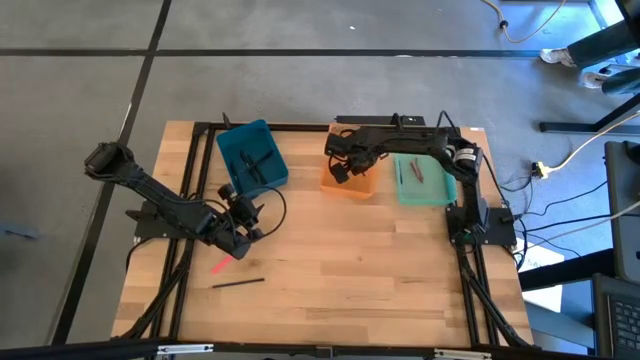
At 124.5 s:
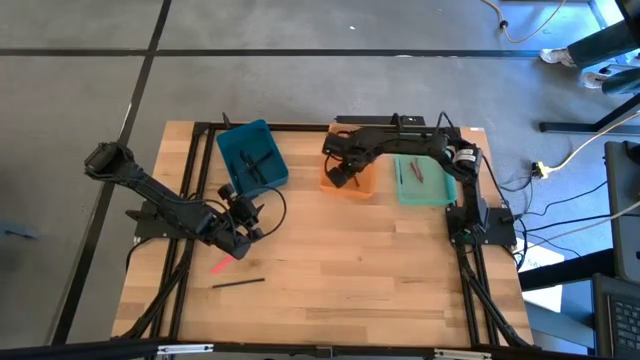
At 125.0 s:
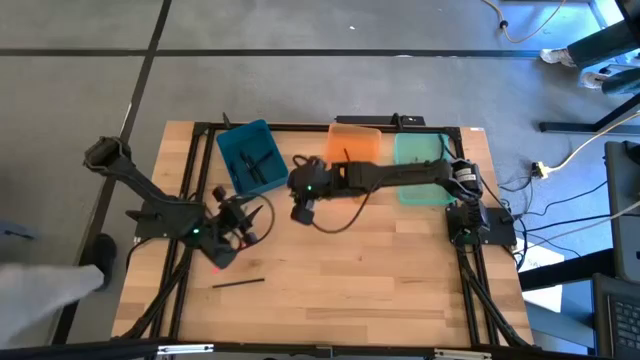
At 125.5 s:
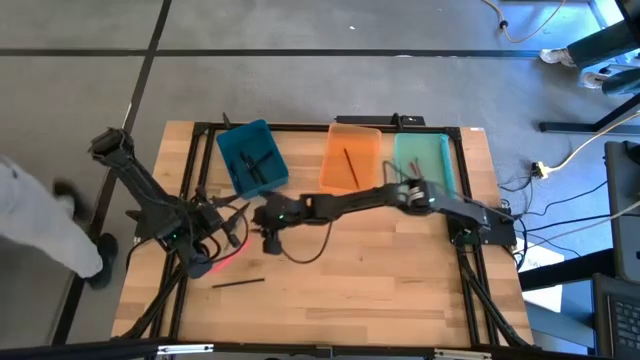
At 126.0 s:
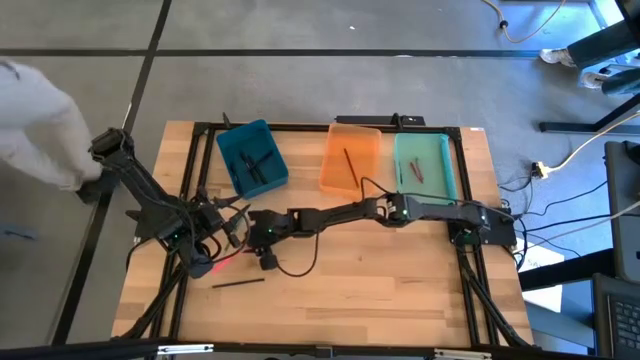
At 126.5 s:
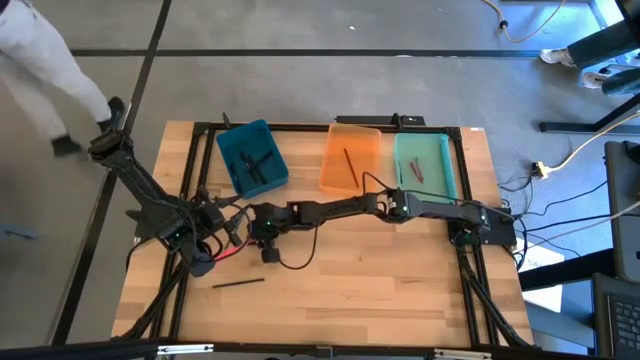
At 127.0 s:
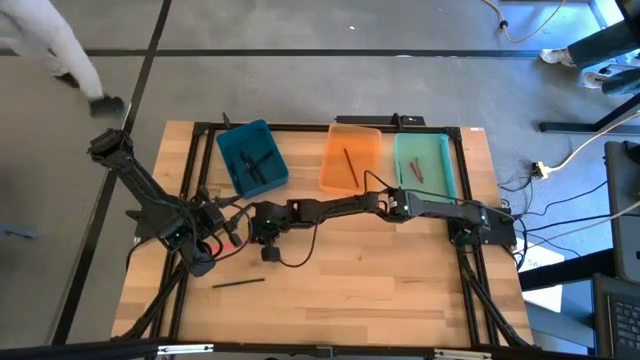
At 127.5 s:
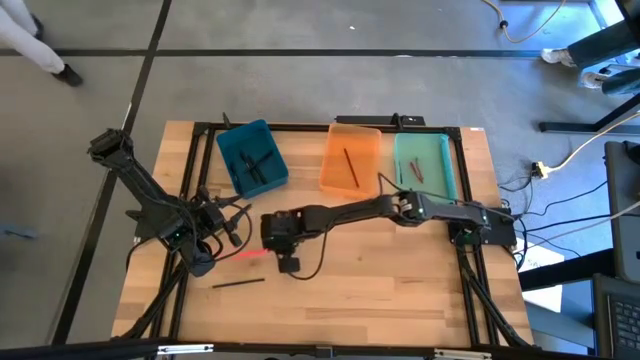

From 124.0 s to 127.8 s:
Task: Sort crayons/erasers/pens/pencils in bins
Put the pink pencil into the orange bin

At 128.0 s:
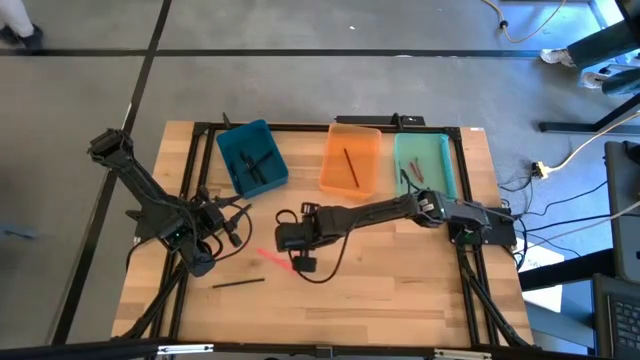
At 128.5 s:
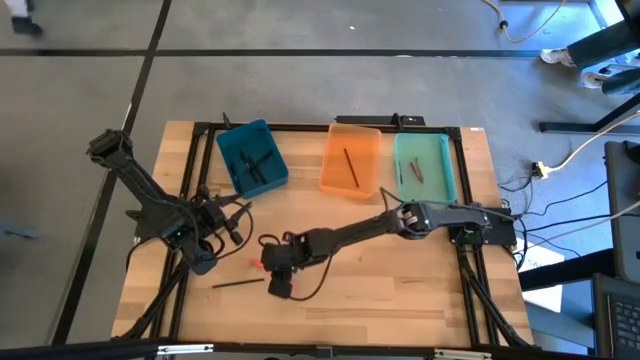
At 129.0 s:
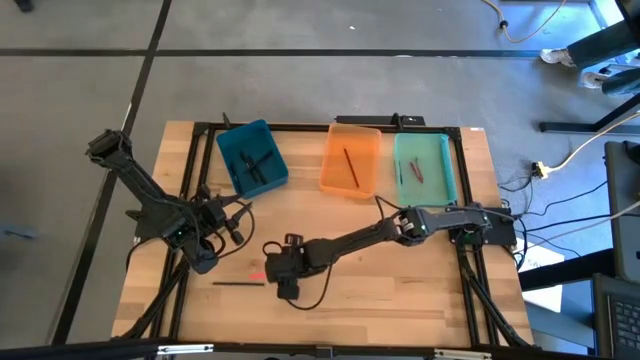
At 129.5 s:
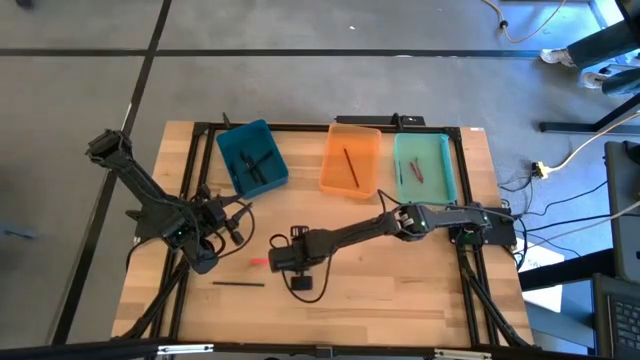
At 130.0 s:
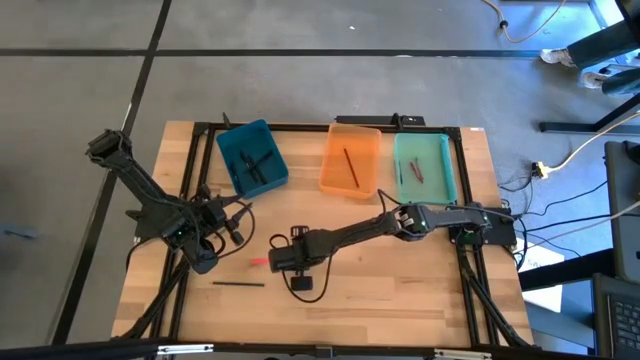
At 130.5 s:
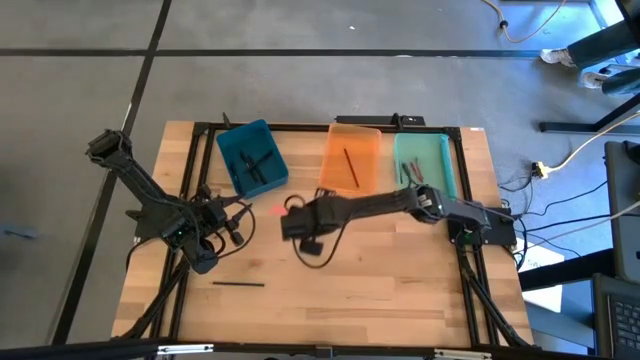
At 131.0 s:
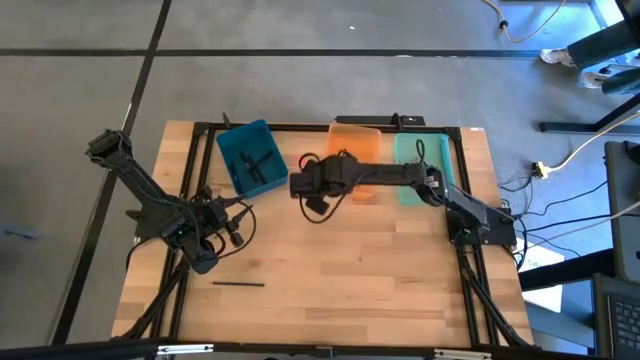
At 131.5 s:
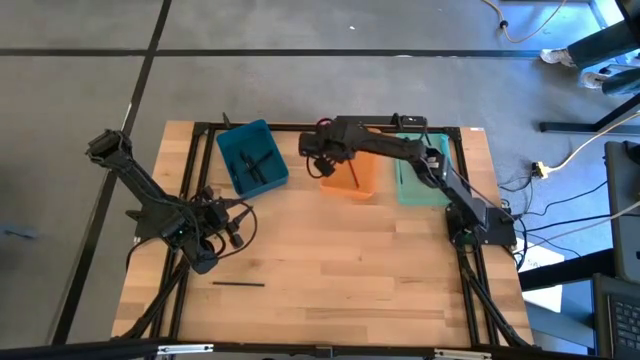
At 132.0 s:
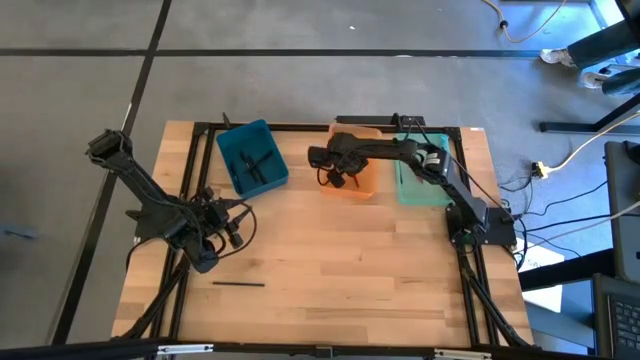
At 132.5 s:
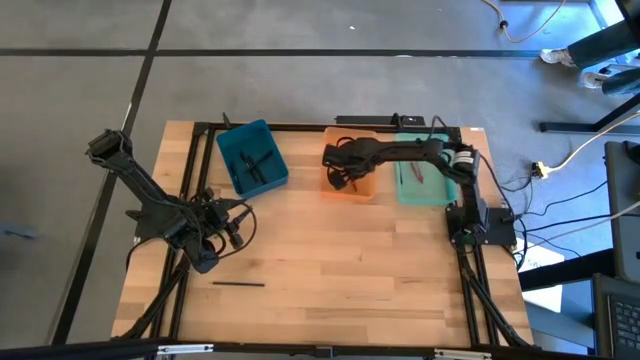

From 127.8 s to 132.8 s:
Put the pink pencil into the orange bin

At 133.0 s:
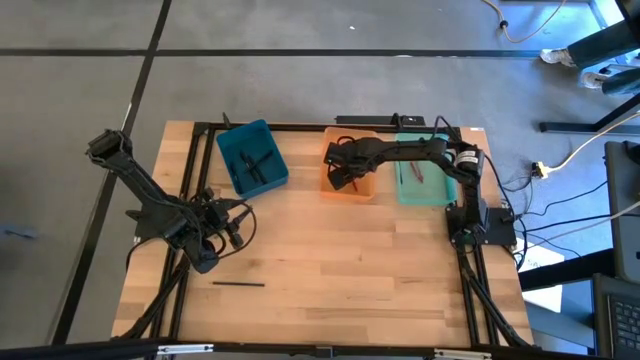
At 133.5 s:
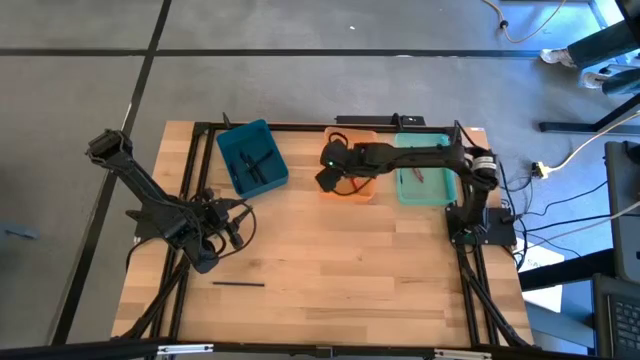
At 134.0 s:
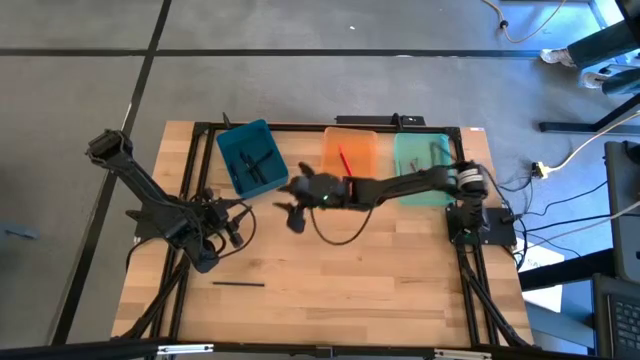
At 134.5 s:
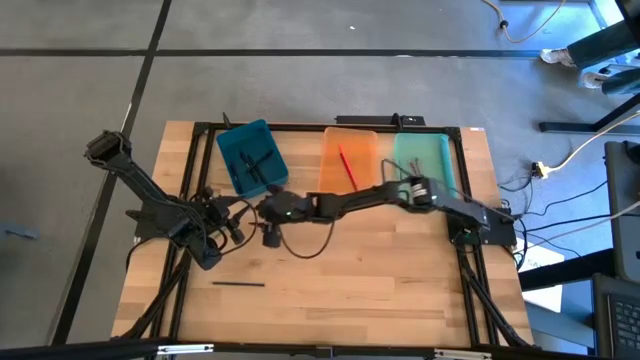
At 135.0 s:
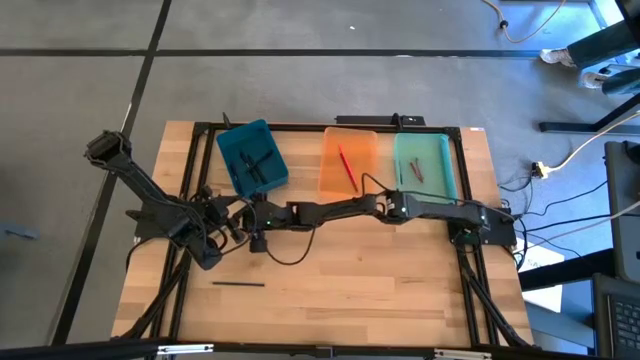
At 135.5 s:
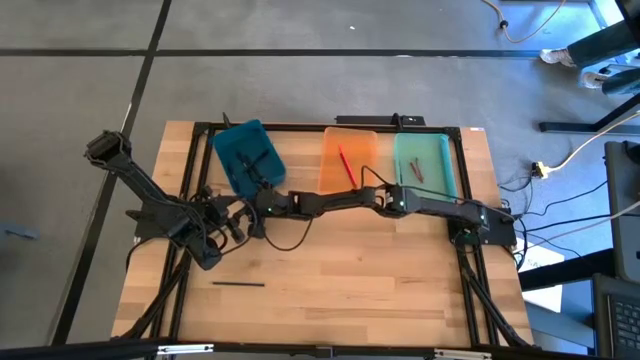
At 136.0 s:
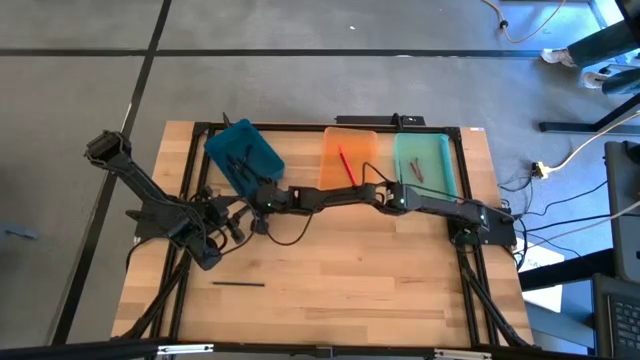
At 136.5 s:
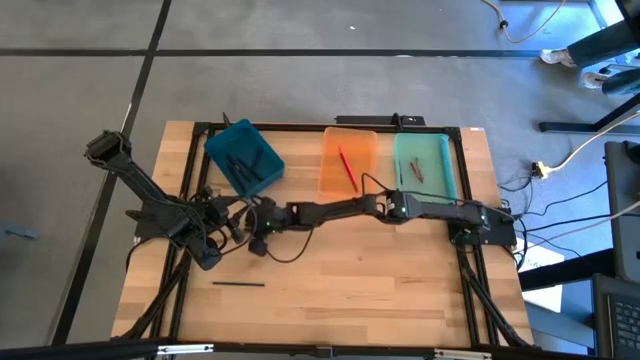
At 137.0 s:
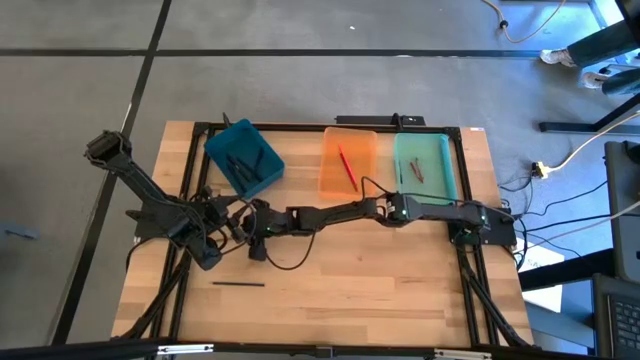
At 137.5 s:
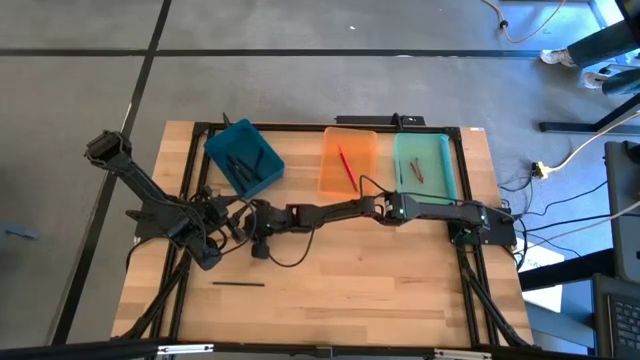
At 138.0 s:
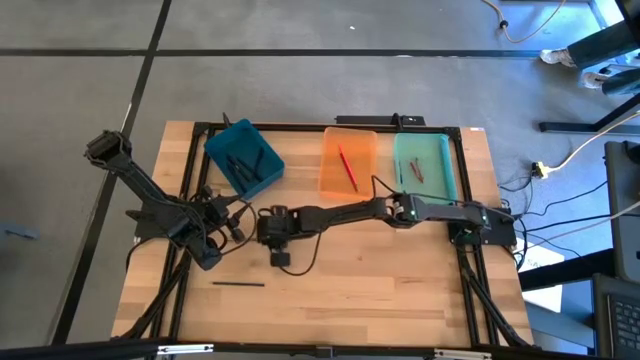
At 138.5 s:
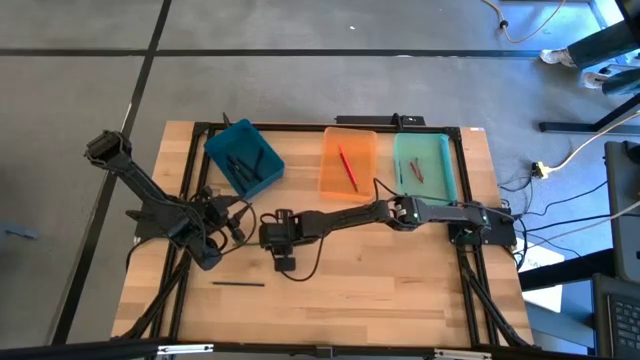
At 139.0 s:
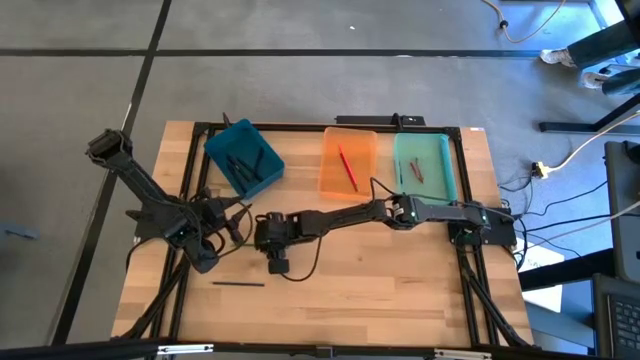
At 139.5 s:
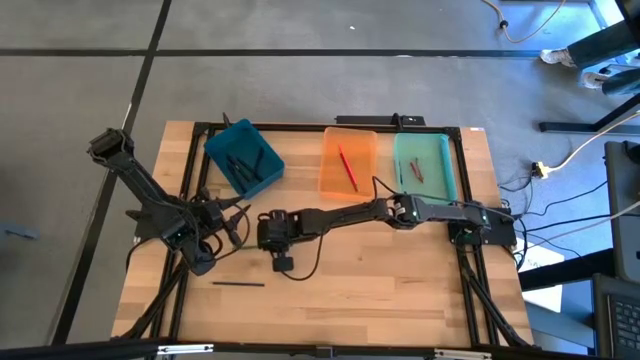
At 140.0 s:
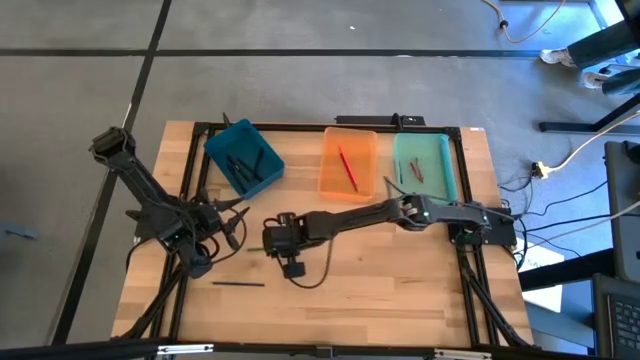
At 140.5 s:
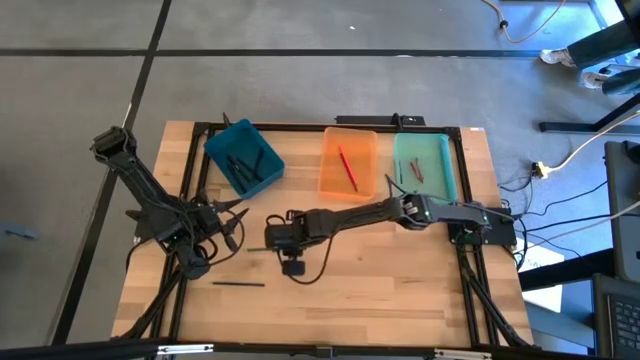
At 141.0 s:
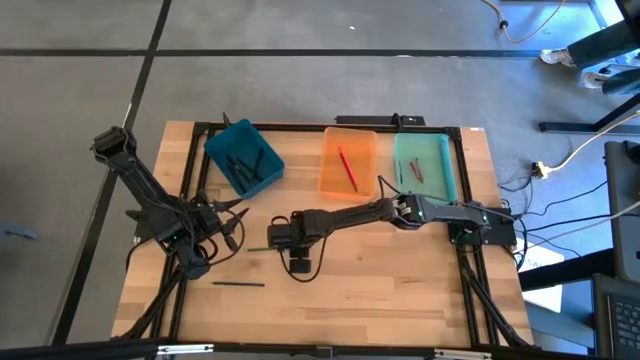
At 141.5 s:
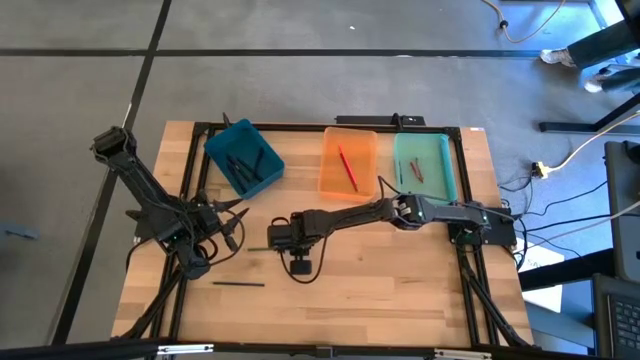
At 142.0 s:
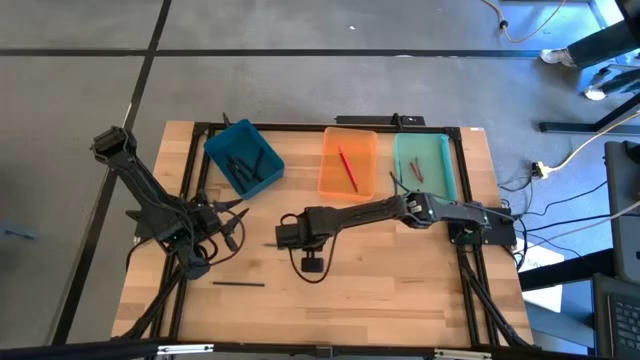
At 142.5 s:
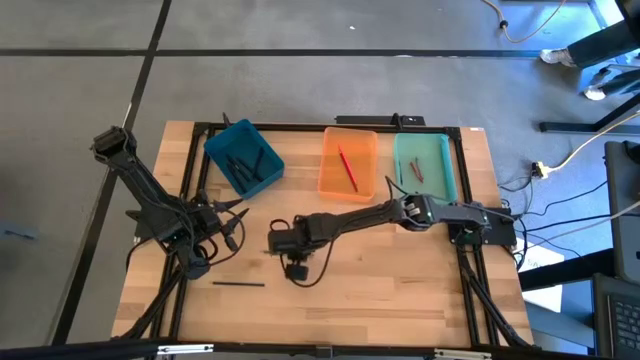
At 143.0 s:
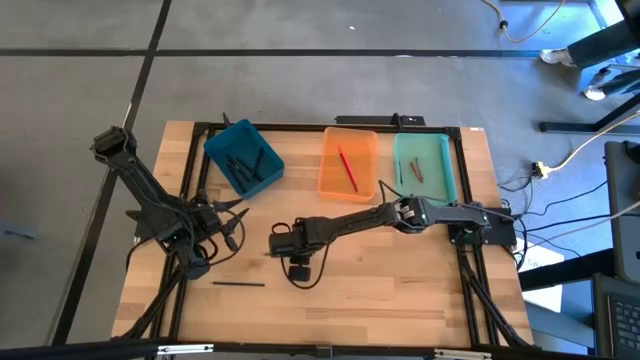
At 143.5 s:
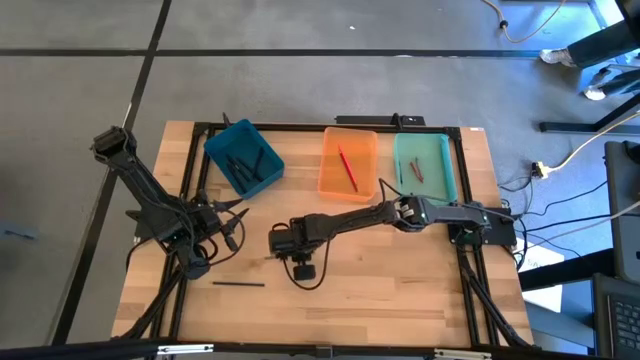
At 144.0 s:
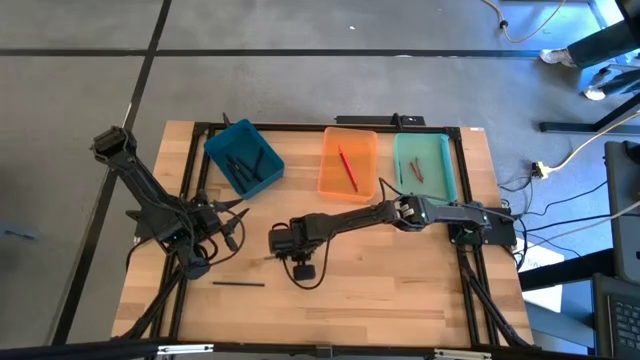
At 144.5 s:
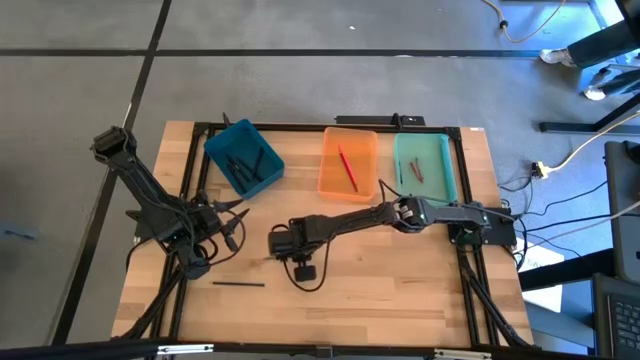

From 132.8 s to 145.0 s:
Put the green pencil into the orange bin
